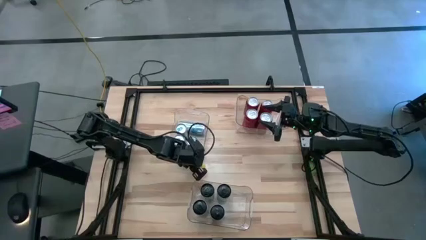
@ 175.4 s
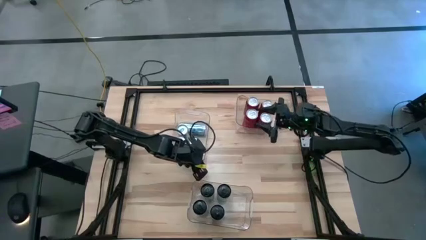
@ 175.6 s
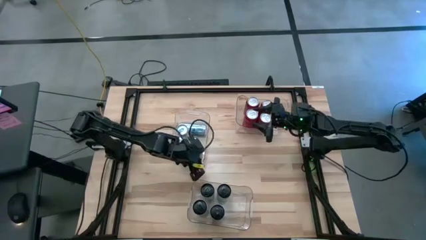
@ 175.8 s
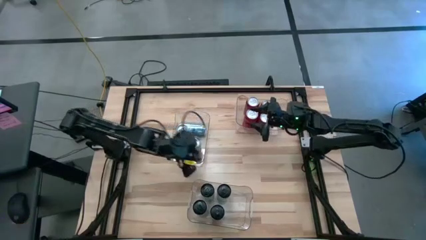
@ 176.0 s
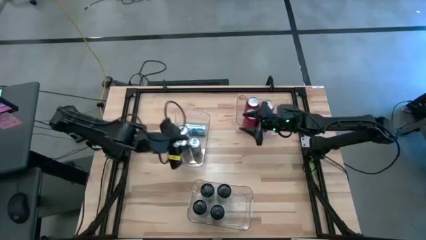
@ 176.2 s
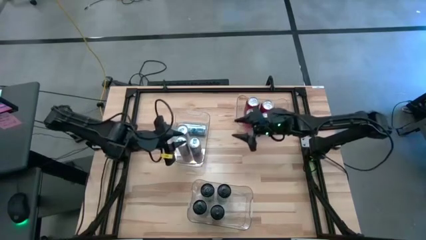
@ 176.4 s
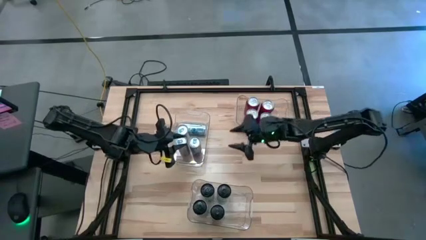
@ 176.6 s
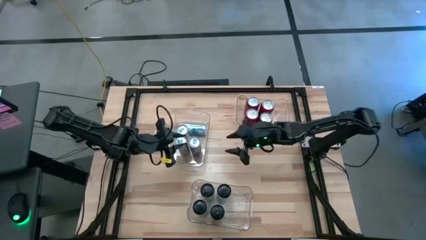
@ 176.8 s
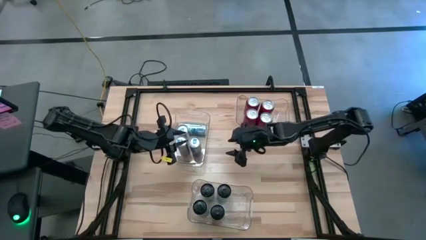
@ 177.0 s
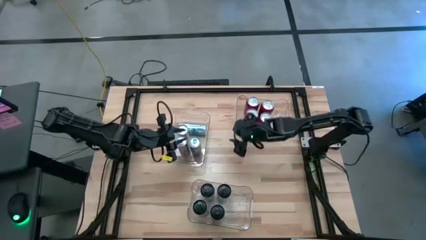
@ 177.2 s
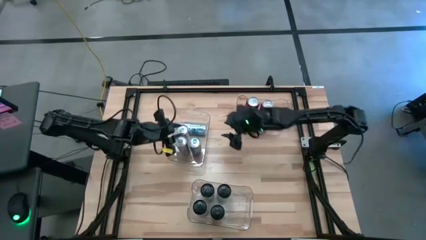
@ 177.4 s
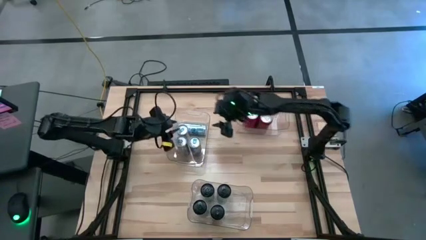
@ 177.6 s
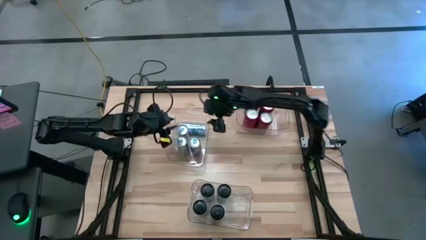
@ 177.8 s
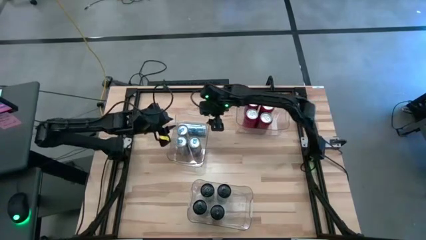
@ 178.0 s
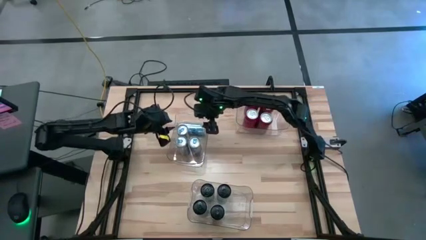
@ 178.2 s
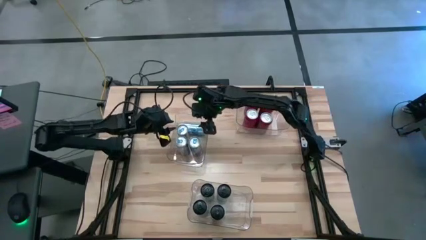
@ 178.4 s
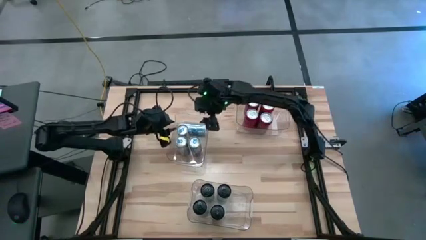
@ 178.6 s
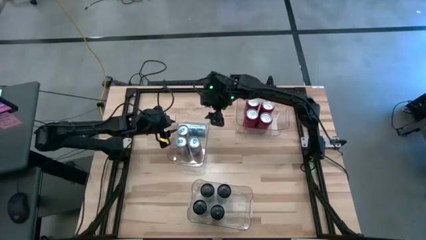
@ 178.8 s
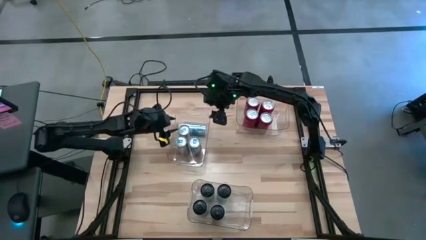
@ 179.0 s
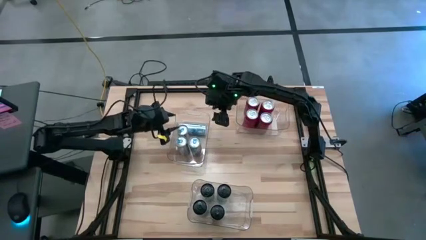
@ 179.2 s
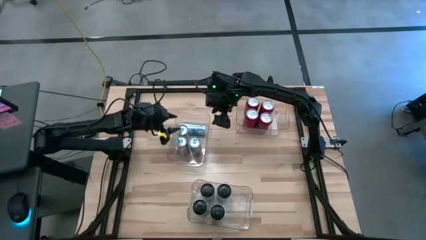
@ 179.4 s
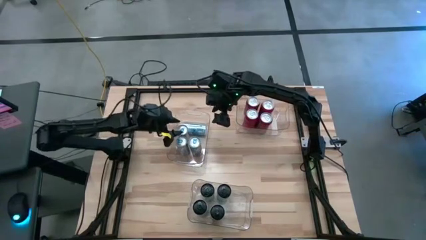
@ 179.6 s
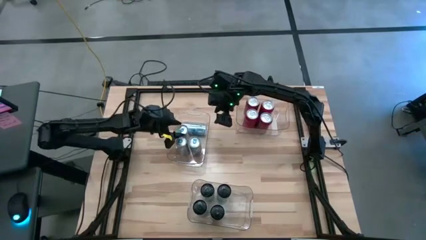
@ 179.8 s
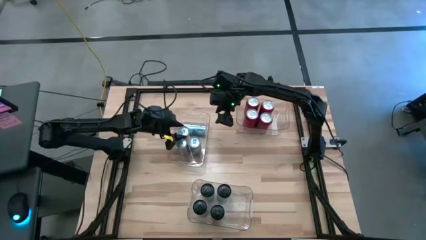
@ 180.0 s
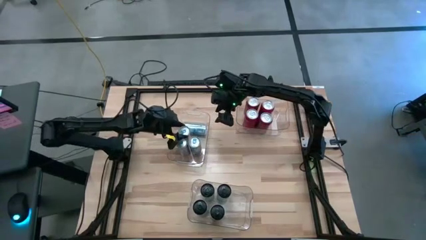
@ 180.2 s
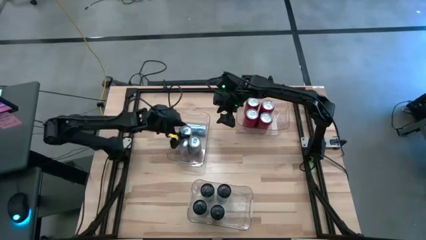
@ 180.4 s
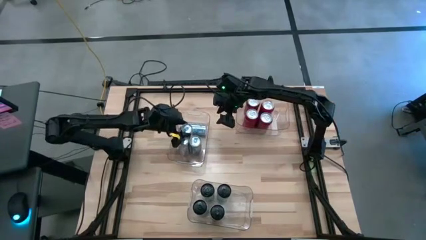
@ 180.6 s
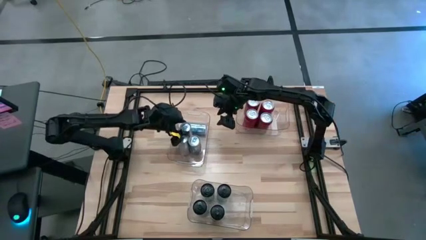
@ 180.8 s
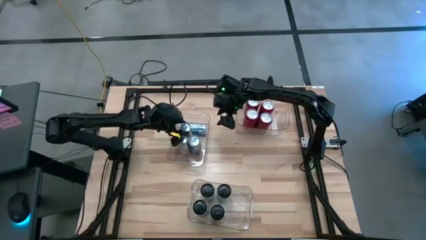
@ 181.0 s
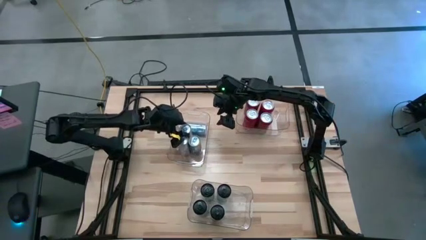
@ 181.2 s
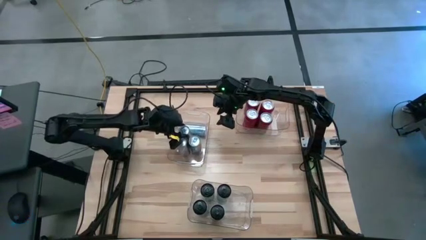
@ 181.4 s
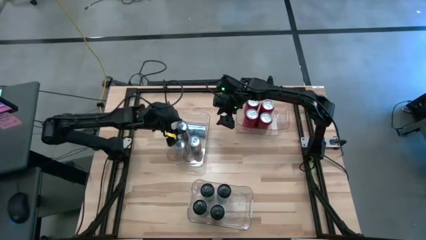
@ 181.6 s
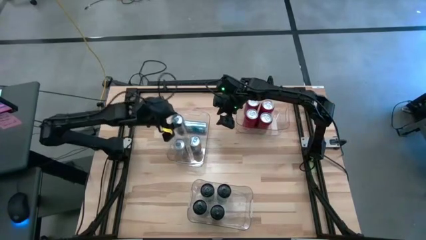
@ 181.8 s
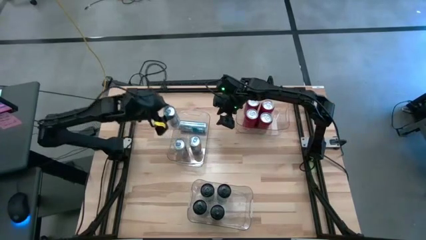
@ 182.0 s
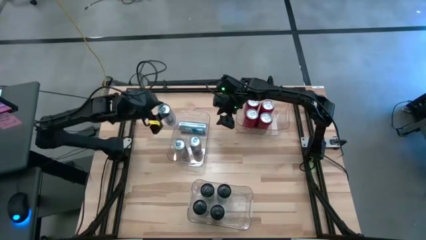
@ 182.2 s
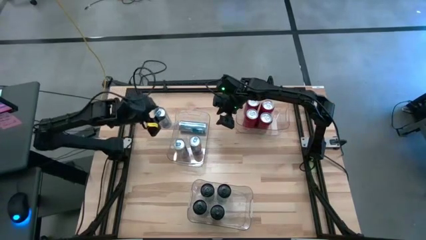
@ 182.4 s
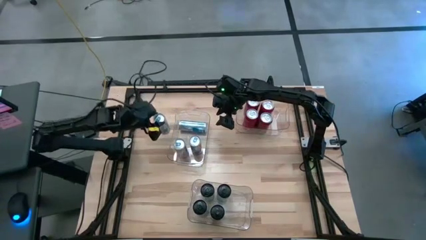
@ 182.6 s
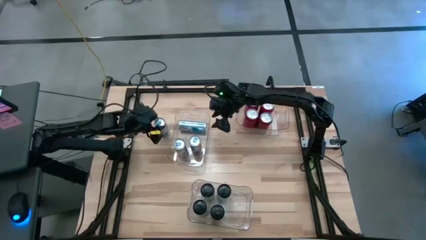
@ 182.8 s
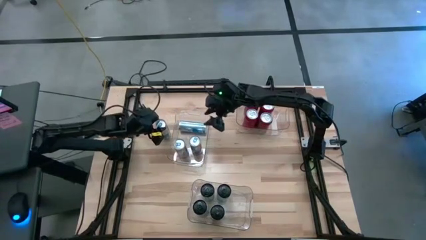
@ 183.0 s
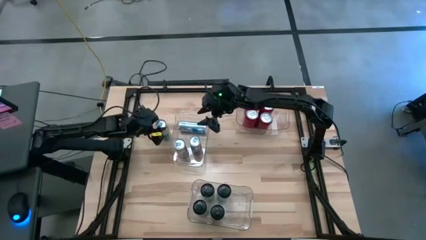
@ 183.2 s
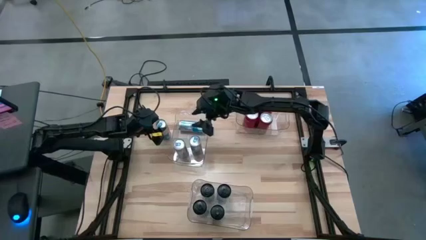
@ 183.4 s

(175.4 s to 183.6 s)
Task: Sort soda cans
Remove the blue soda can from the top left transparent bin

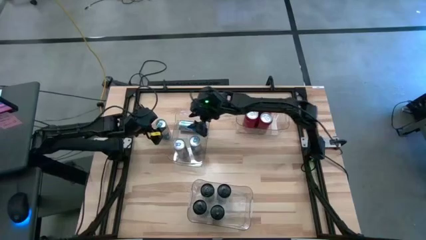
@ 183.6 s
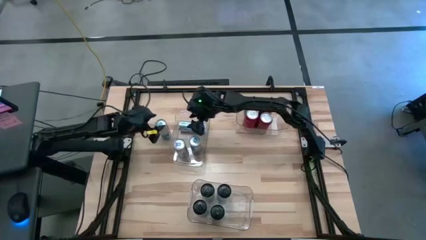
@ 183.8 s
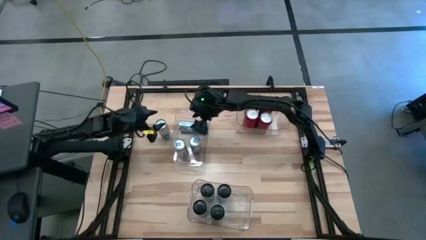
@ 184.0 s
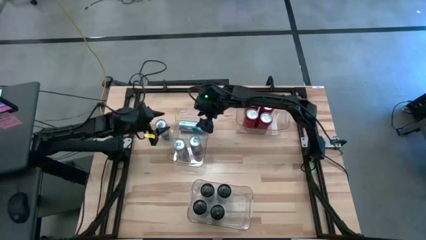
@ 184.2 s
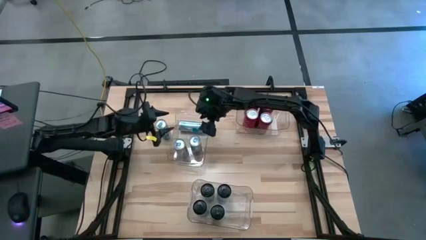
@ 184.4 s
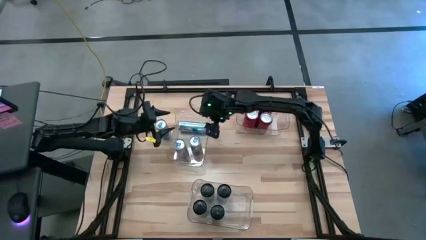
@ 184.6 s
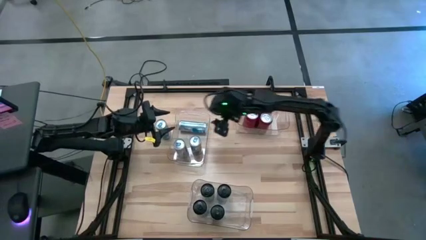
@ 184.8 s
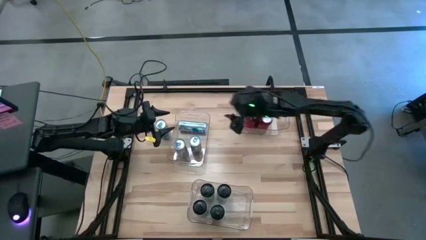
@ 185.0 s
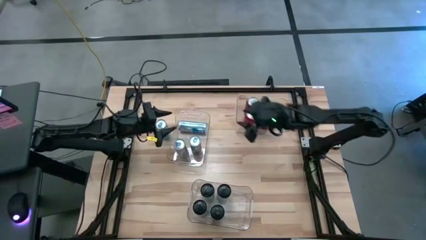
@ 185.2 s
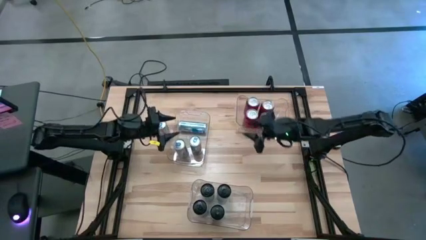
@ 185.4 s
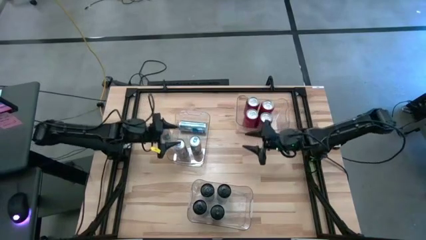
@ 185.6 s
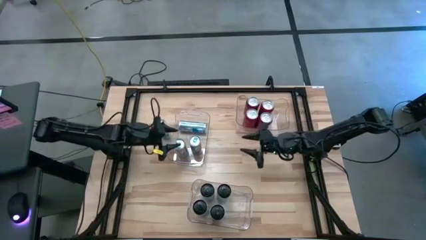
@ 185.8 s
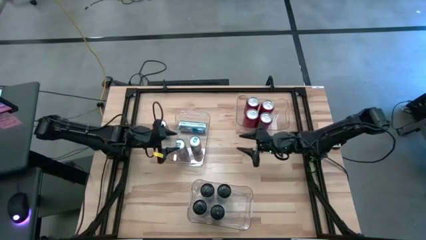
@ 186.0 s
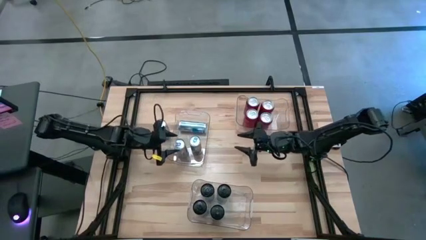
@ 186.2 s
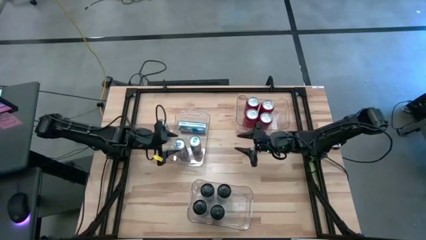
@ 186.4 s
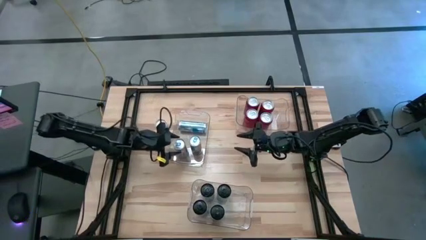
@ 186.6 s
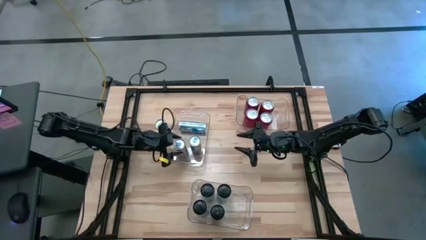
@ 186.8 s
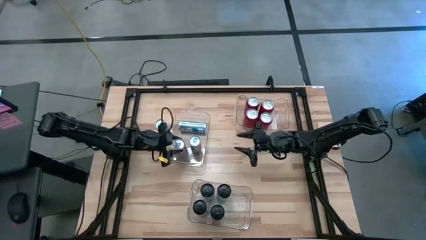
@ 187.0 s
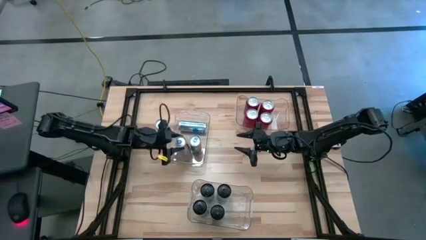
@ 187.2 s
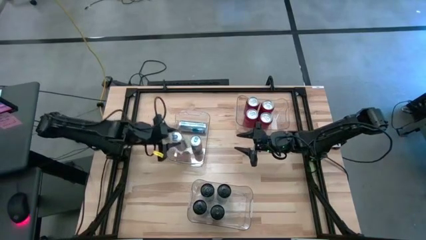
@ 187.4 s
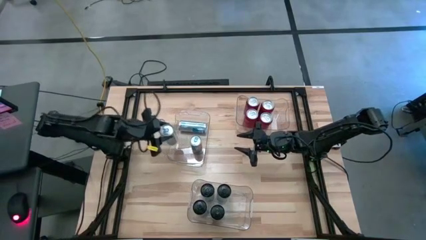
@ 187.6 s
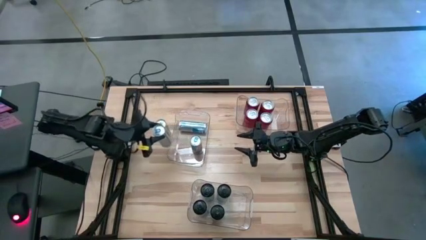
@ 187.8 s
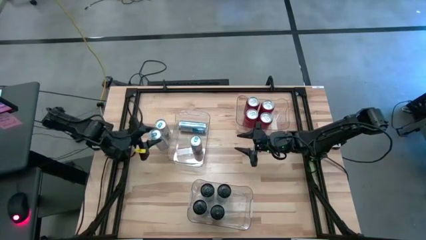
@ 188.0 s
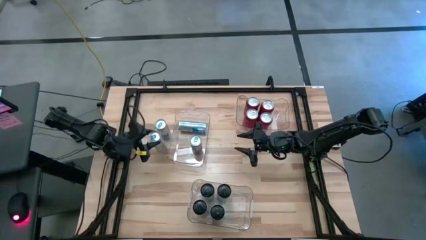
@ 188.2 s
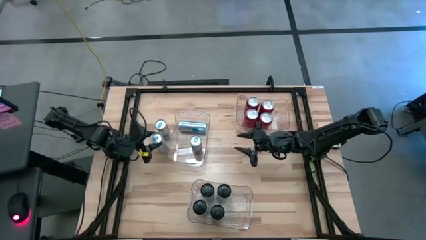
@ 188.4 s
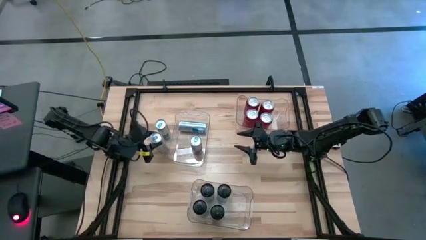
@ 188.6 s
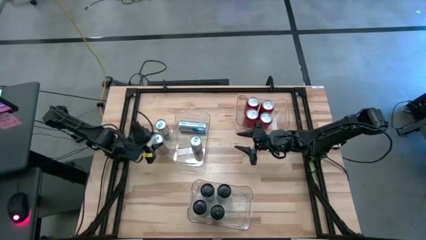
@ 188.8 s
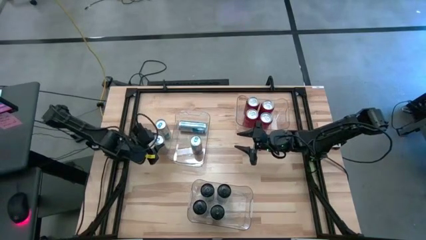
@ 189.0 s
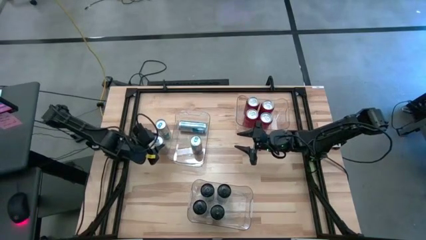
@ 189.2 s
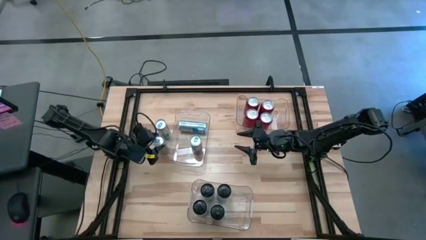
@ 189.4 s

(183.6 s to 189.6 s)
Remove the blue soda can from the top left transparent bin
